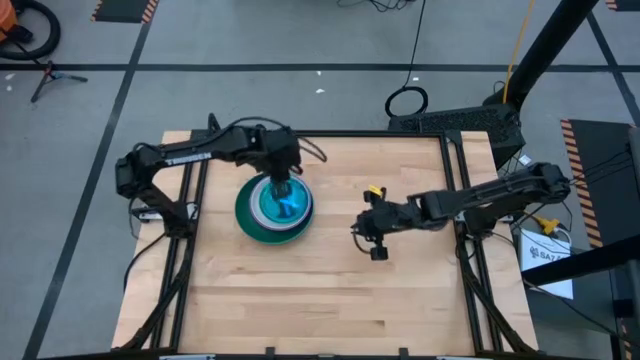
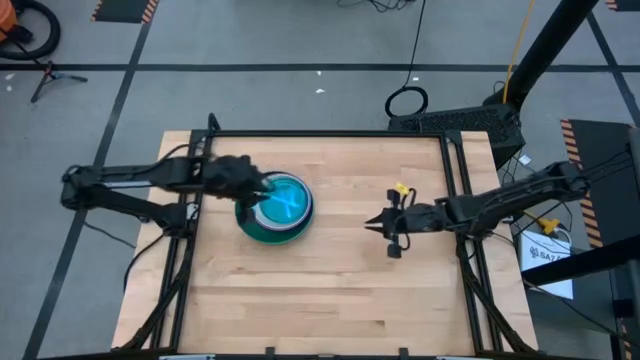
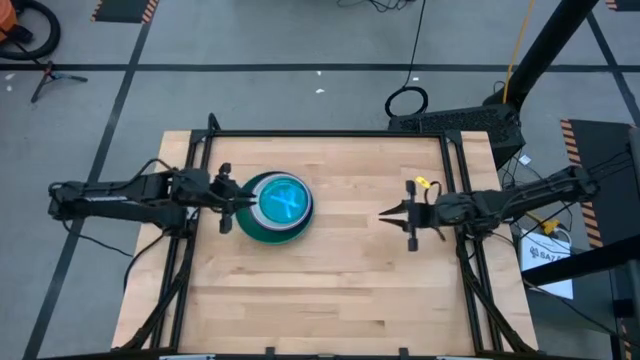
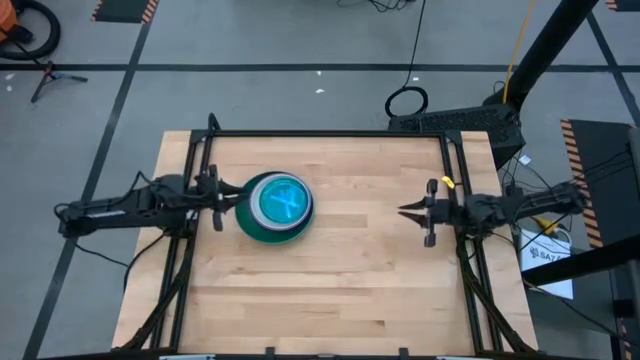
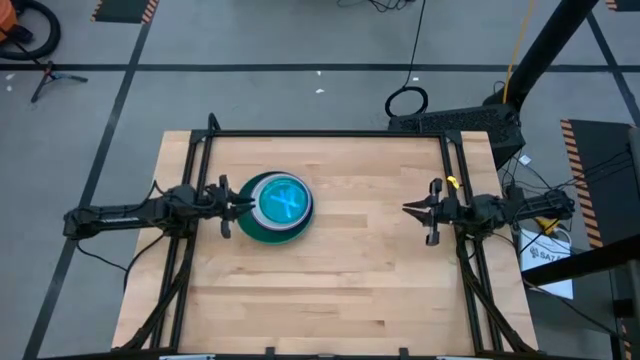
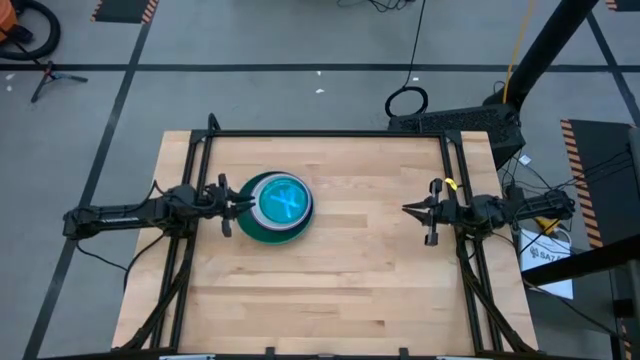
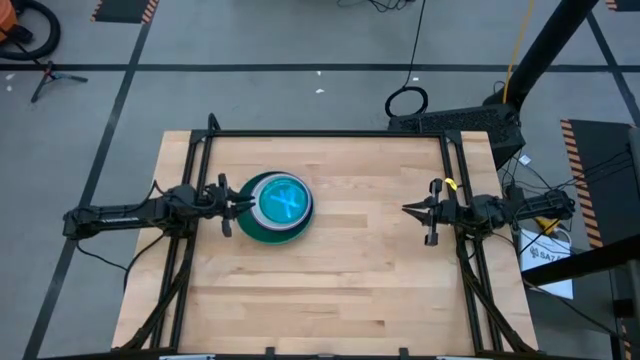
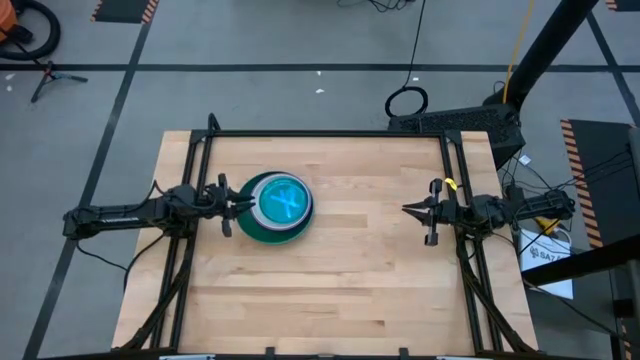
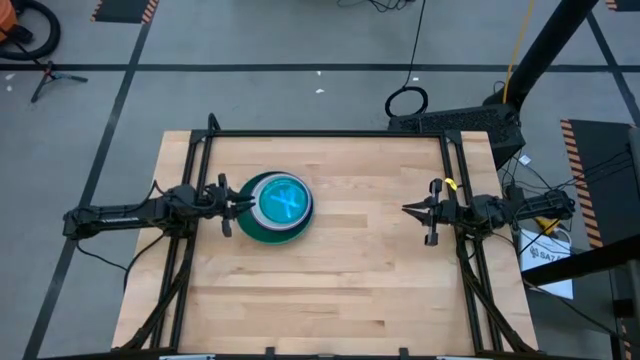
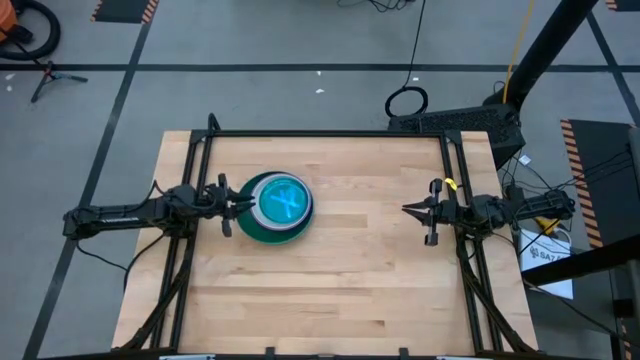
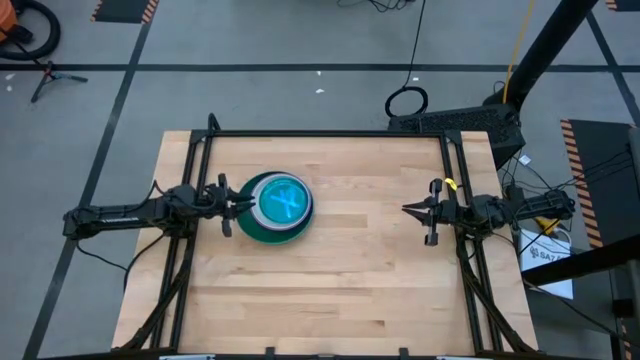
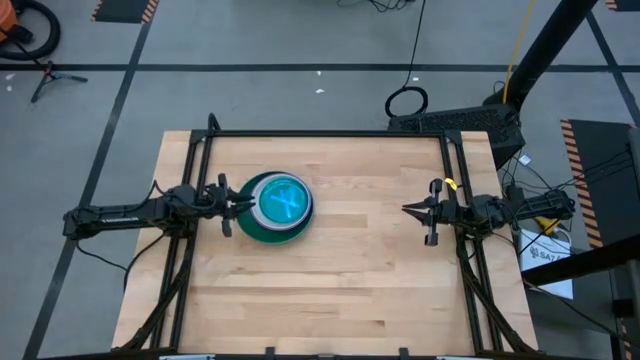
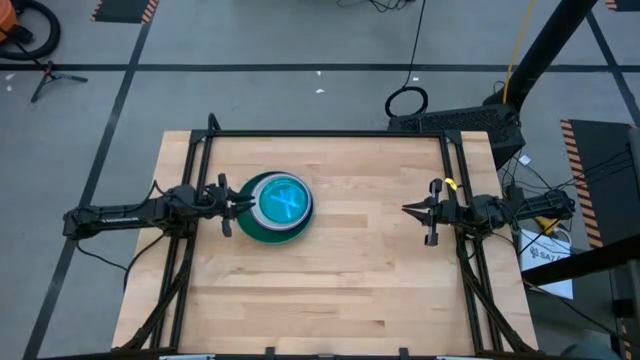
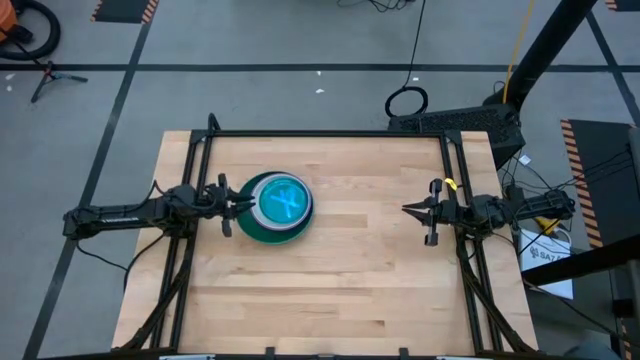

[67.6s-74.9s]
Task: Stack plastic plates
Return to Home Position

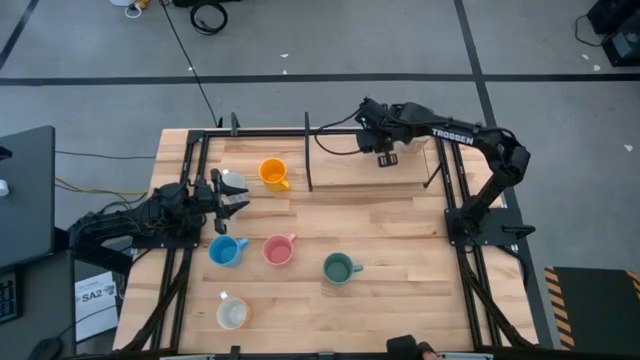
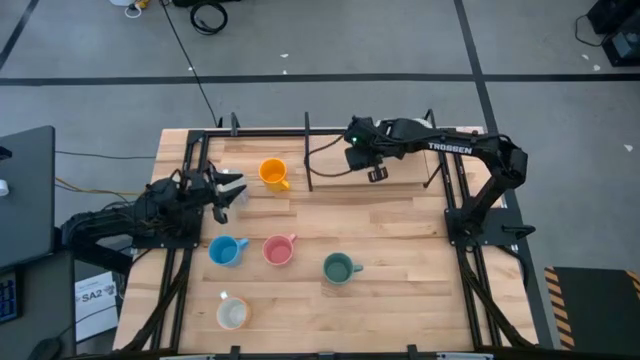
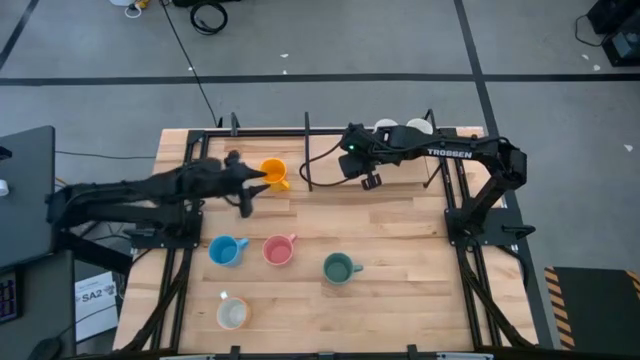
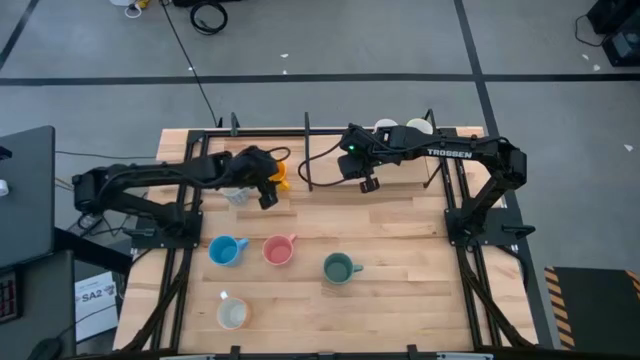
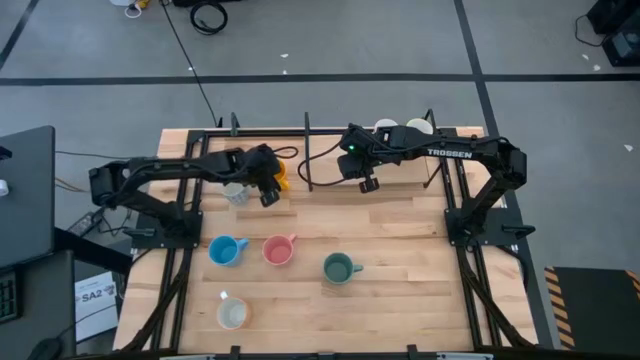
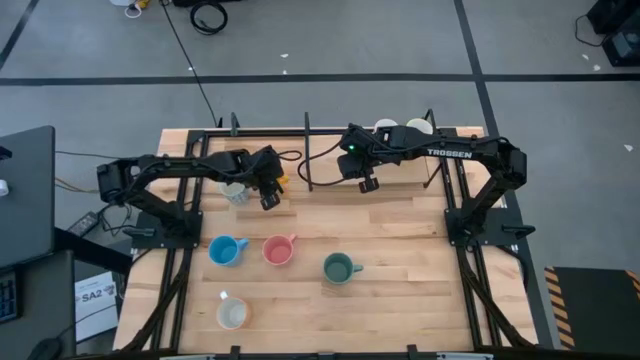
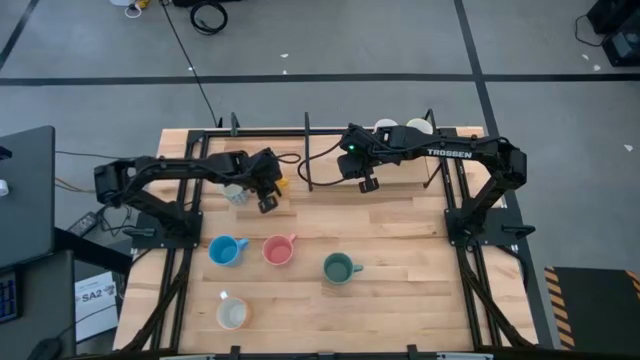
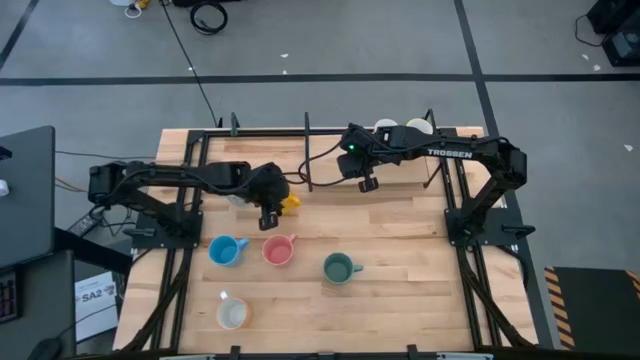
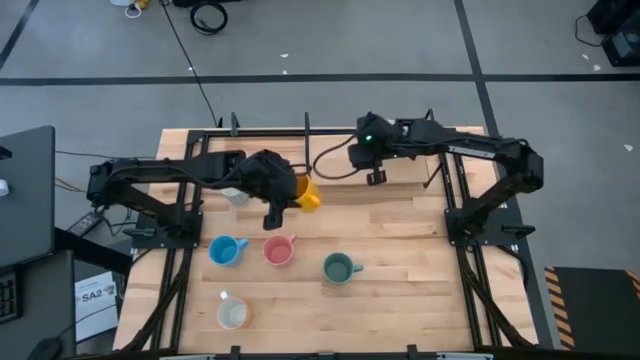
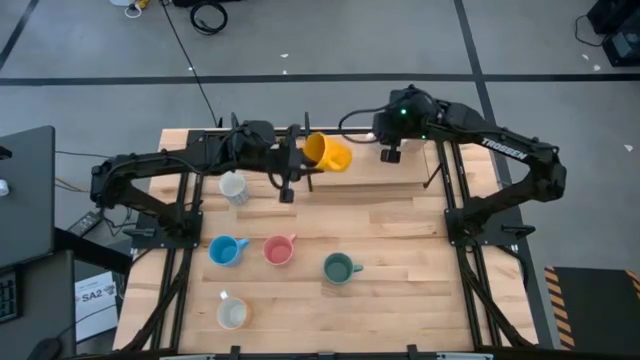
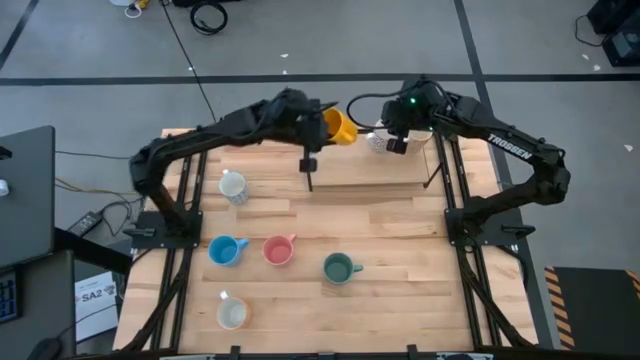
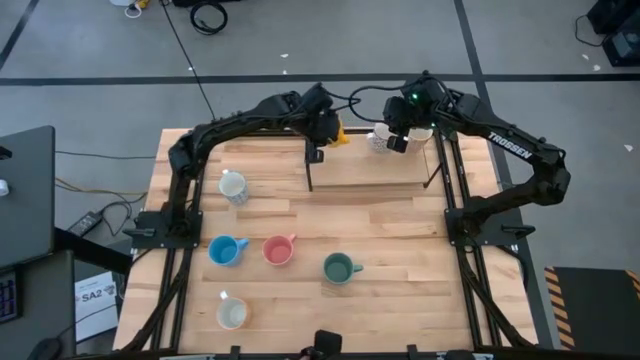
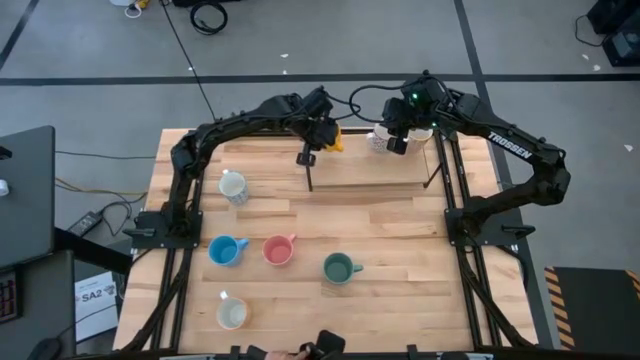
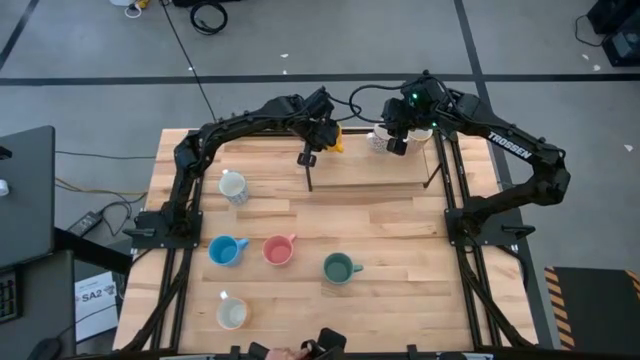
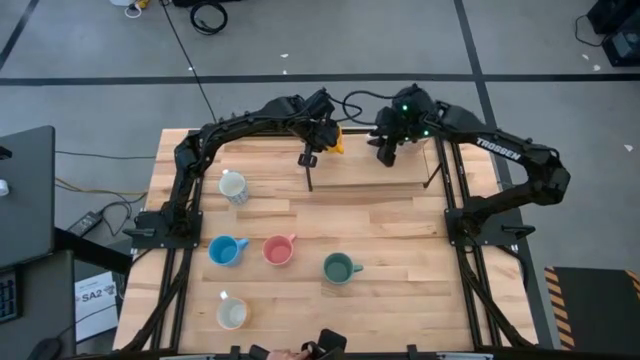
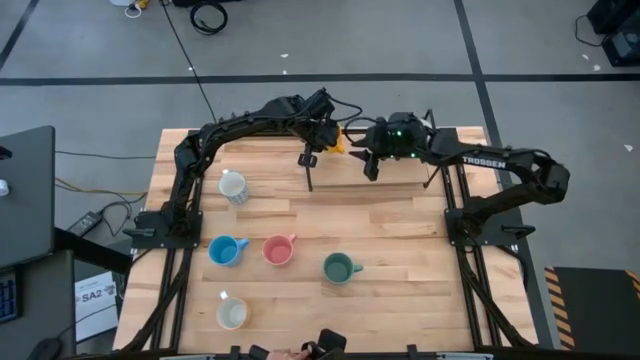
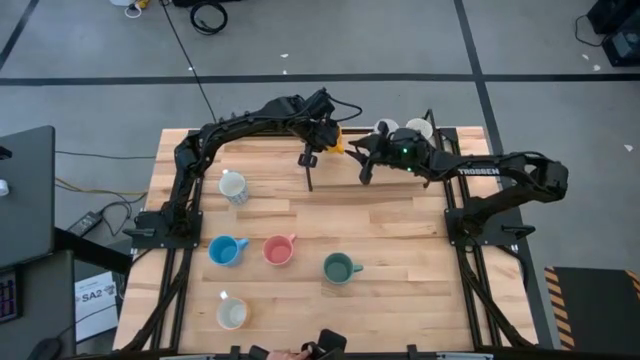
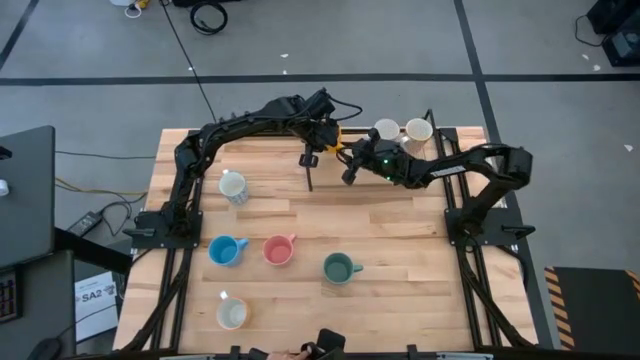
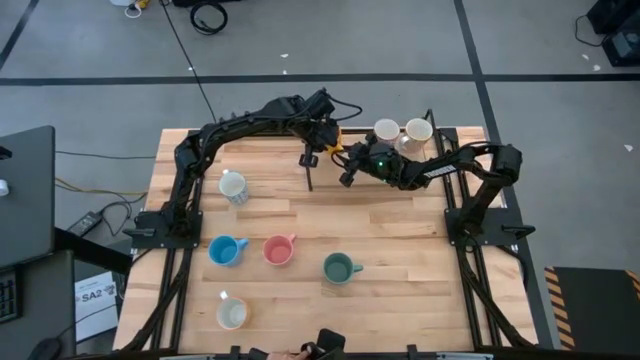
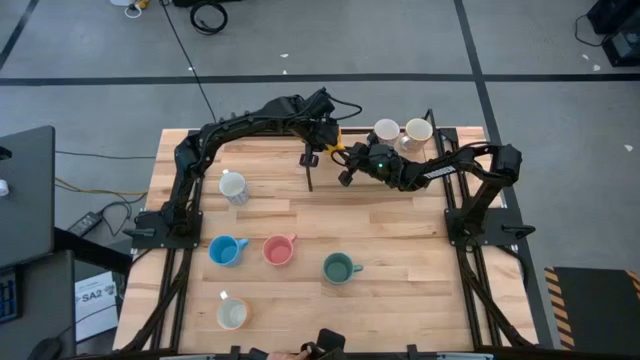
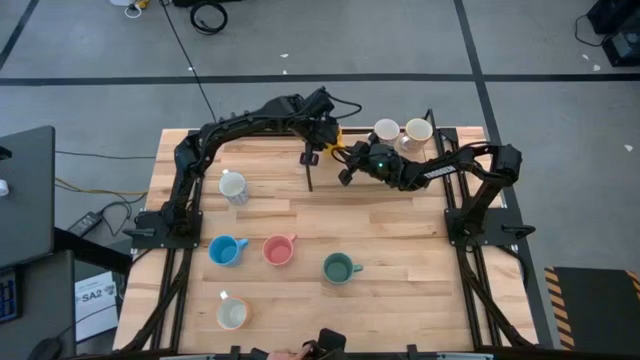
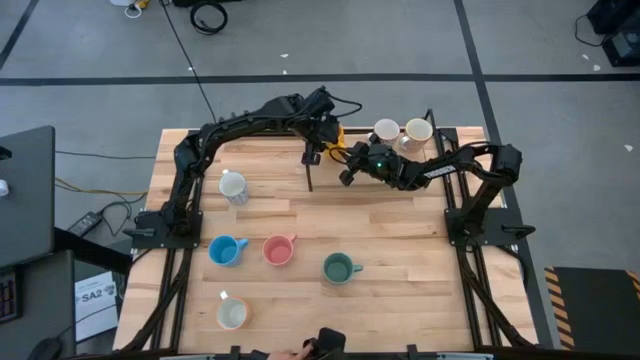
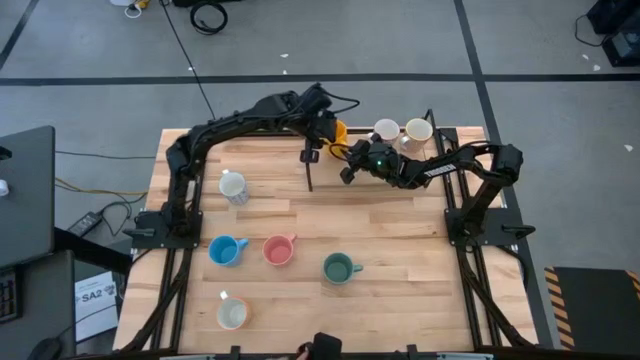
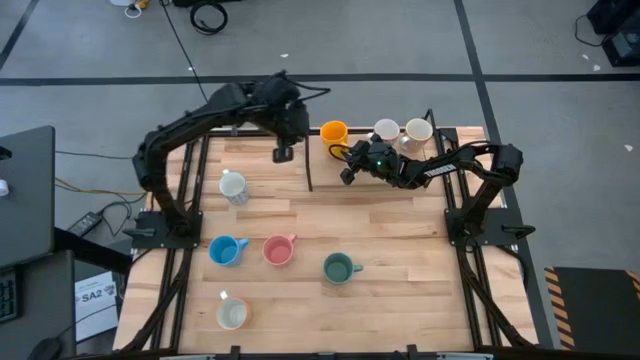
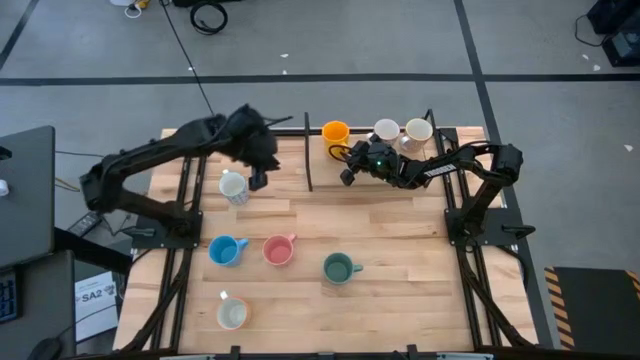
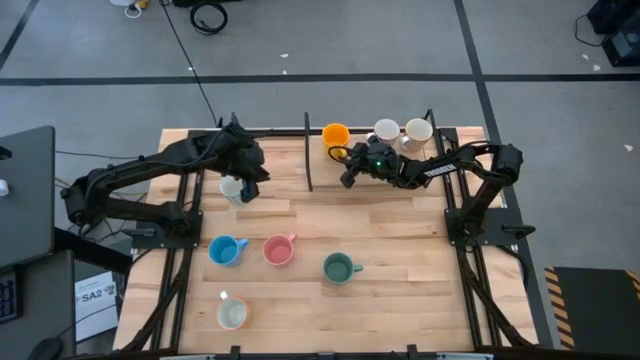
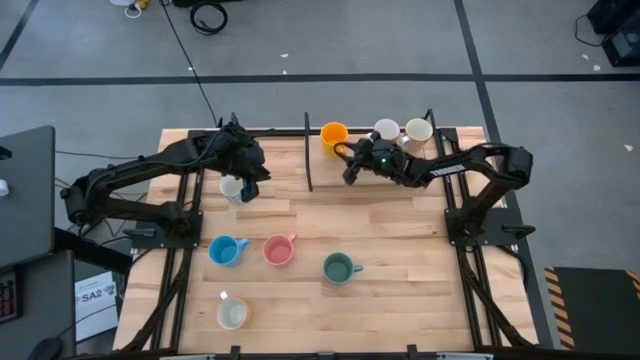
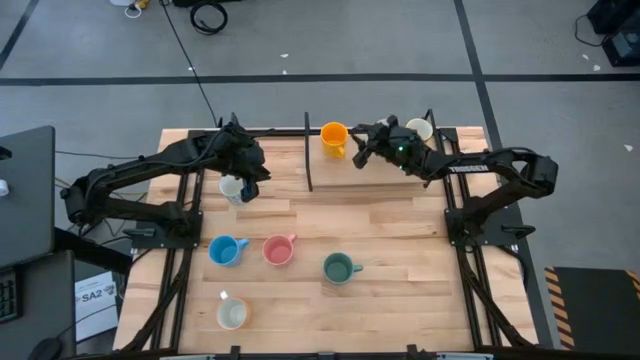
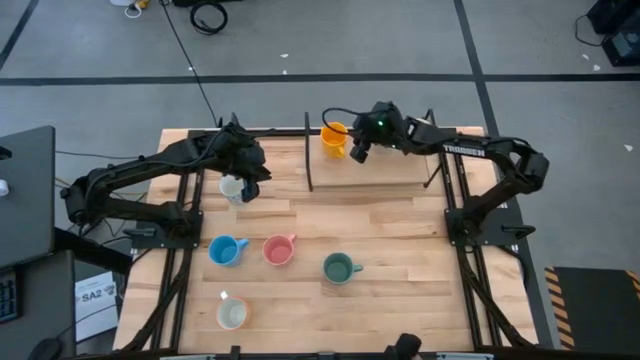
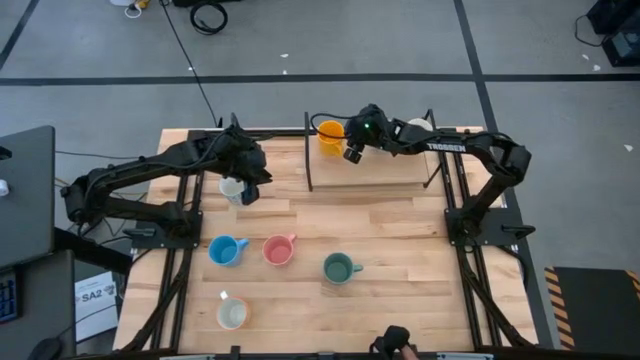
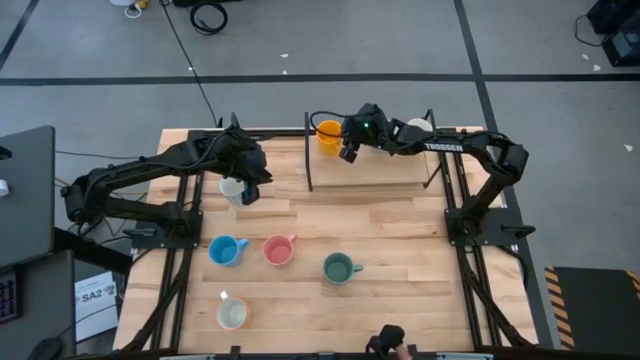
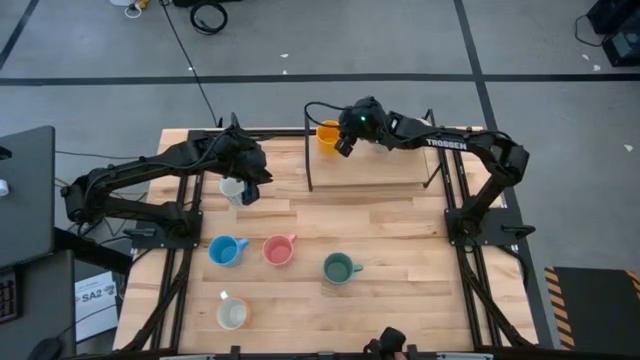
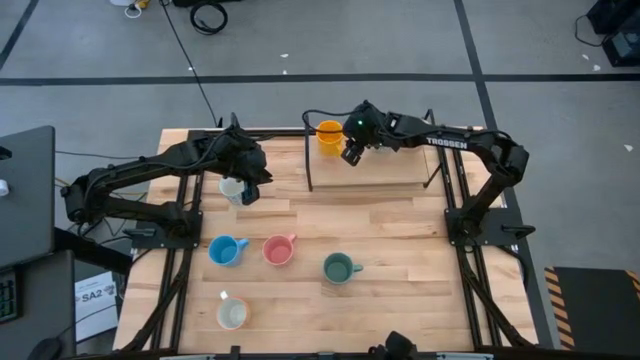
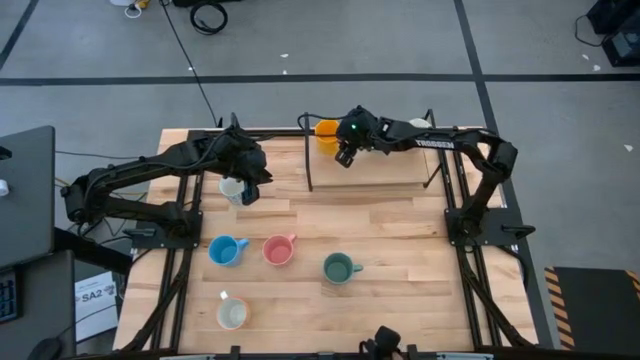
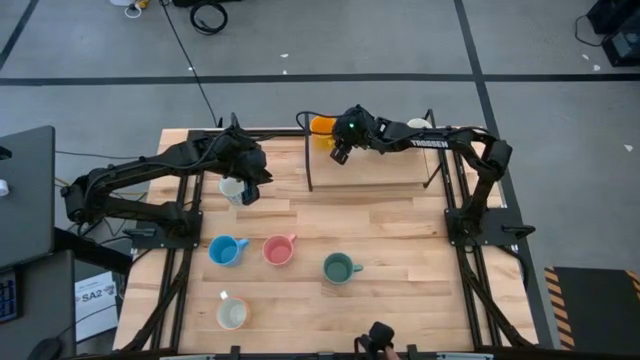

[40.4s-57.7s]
Task: Place coffee mugs
Put the yellow mug on the shelf
